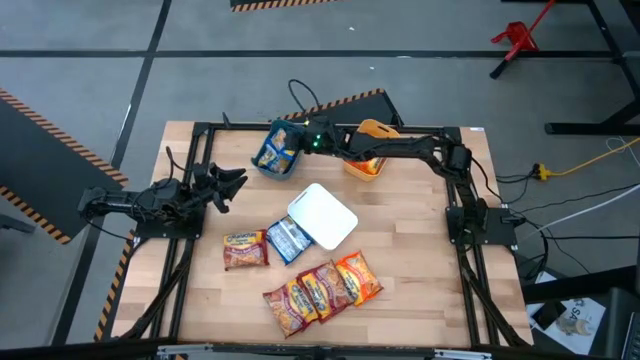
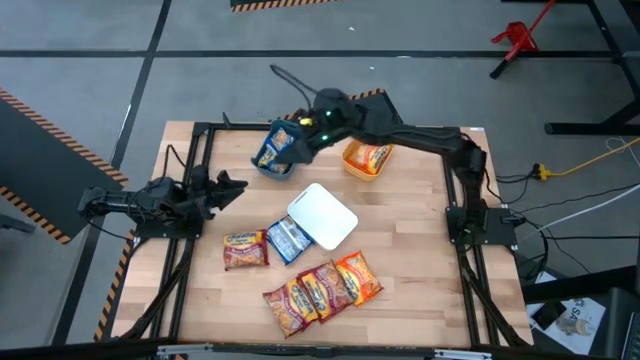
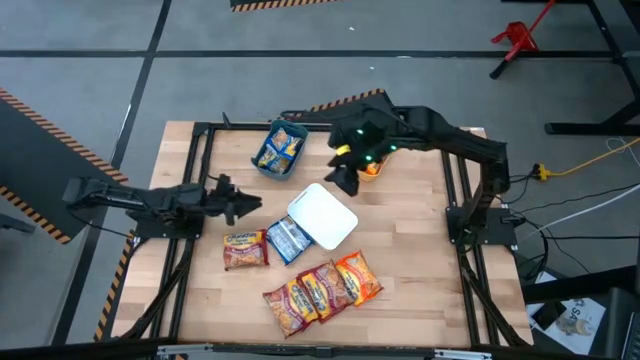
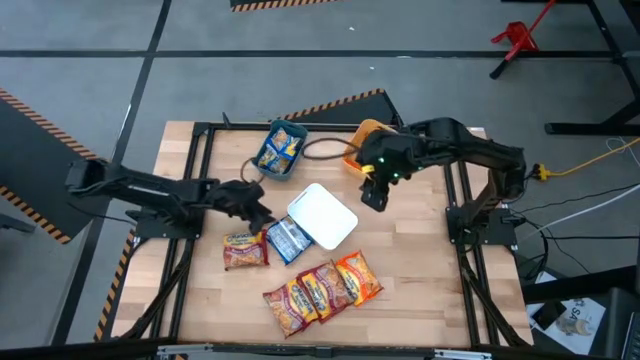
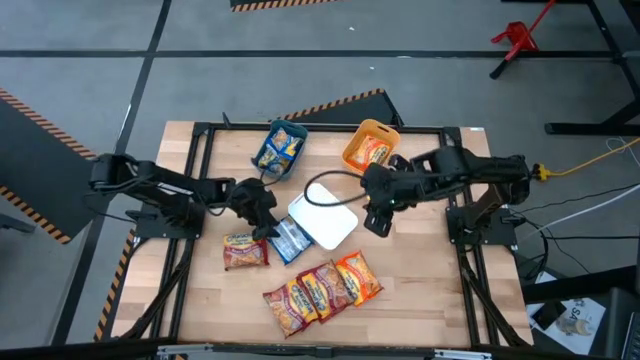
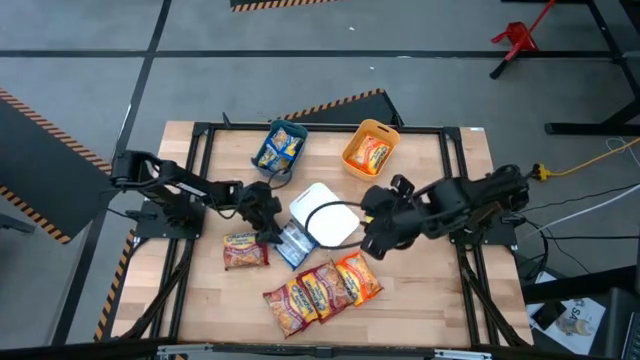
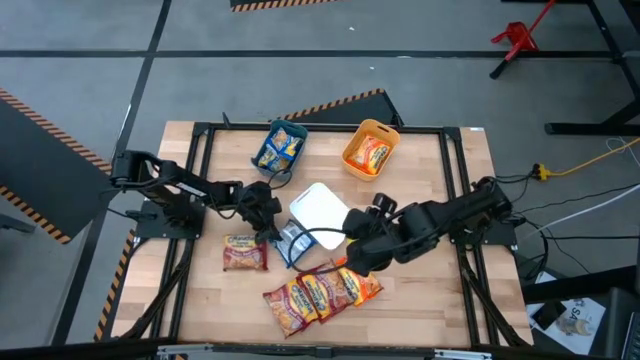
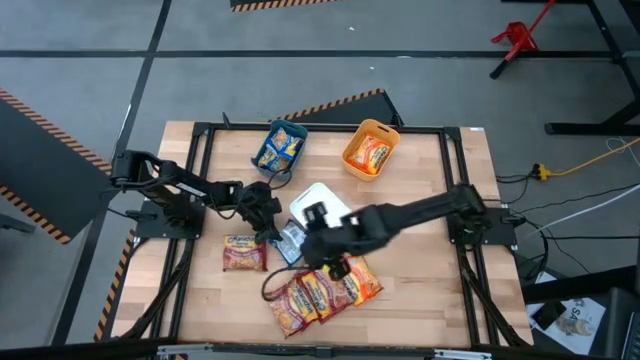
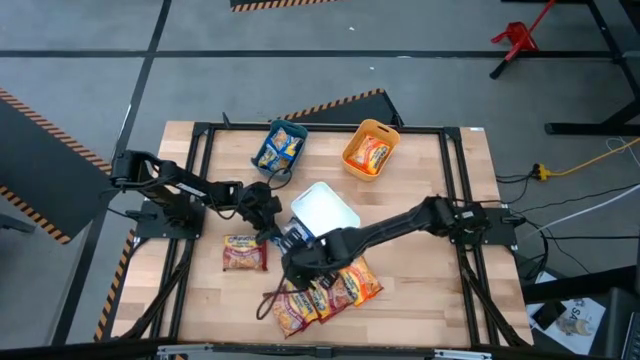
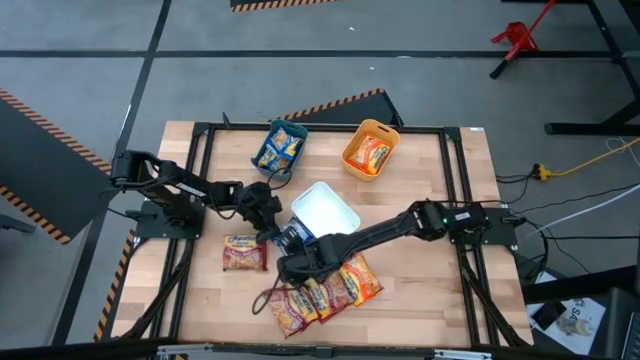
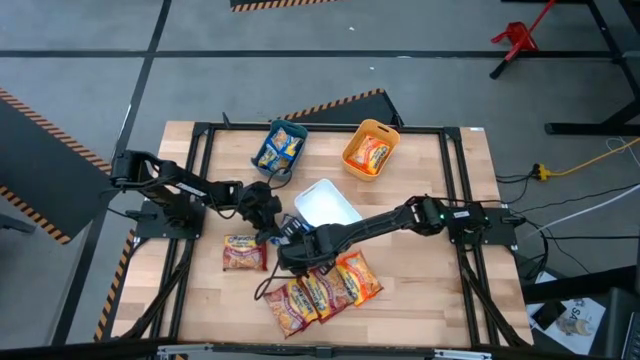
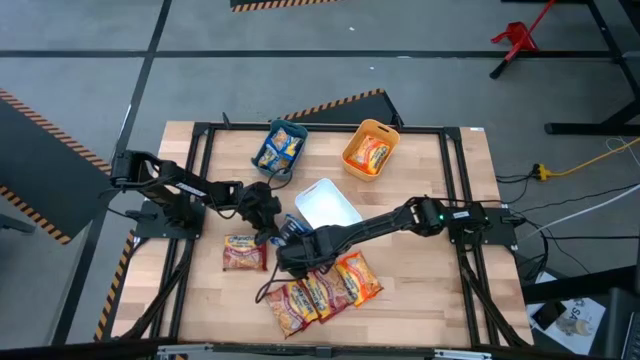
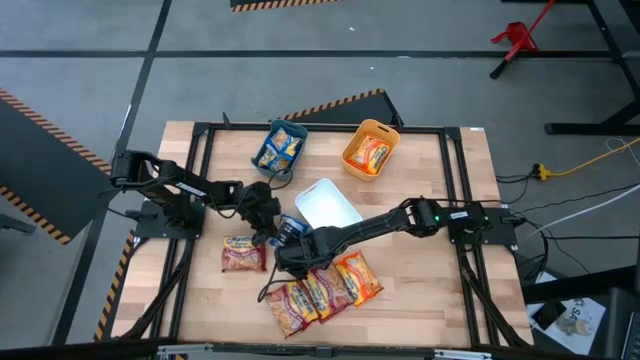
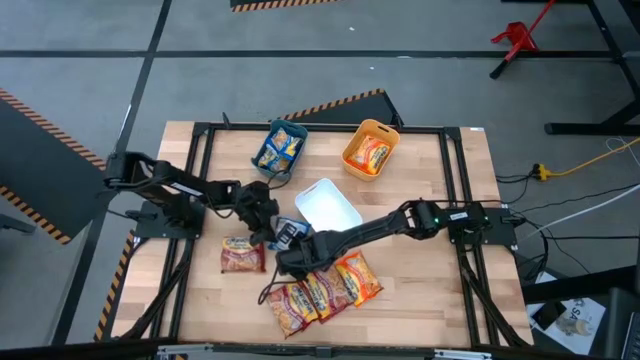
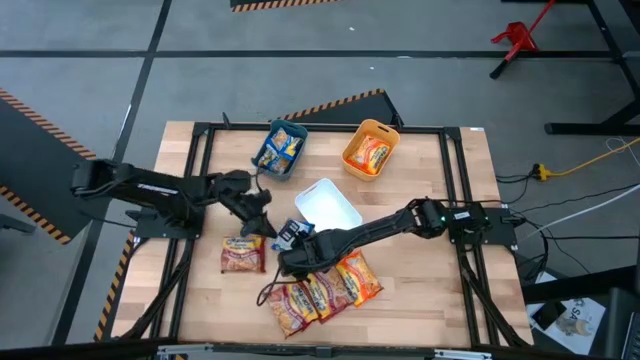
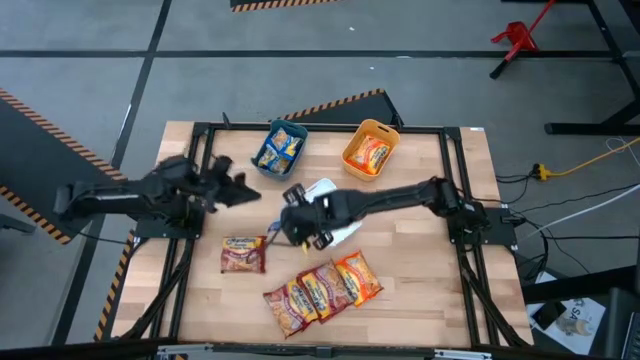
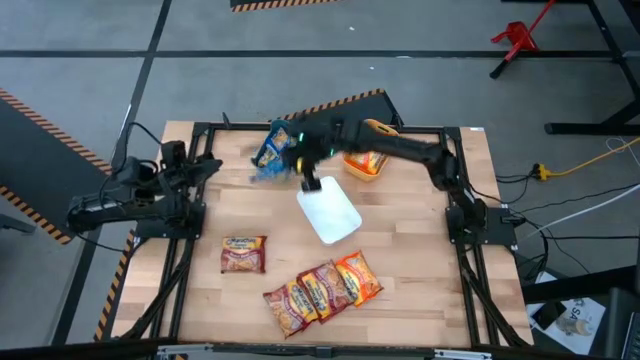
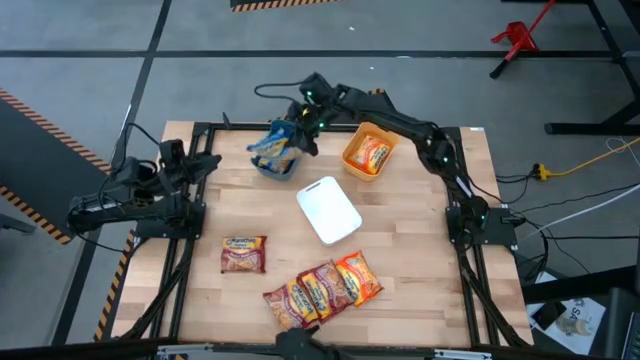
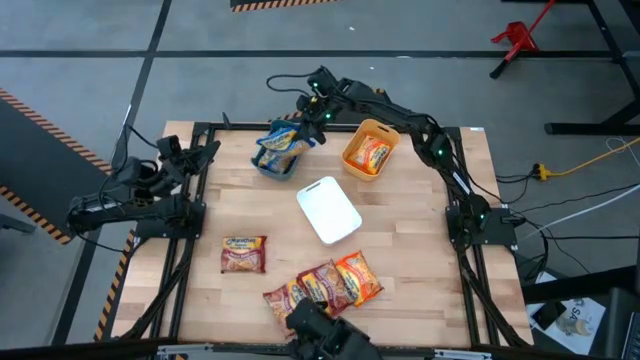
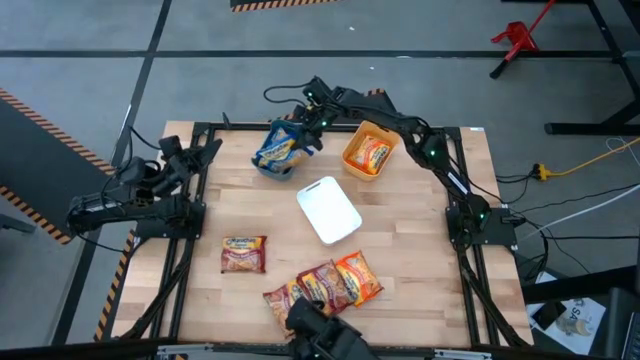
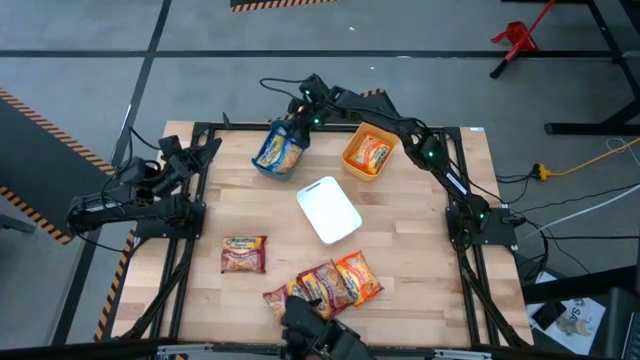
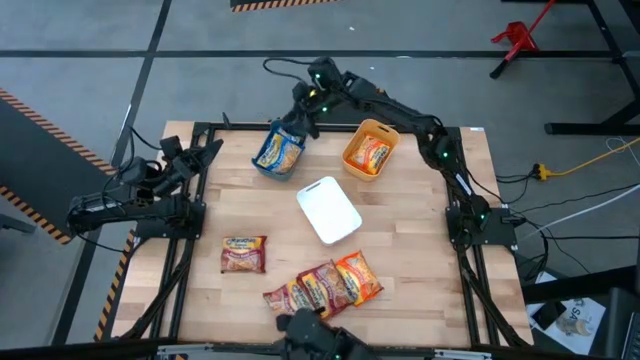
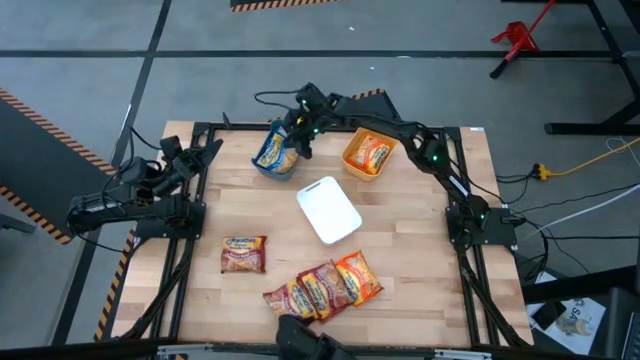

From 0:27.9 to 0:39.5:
Task: Sort Maruchan noodles
Put the blue noodle pack into the blue bin

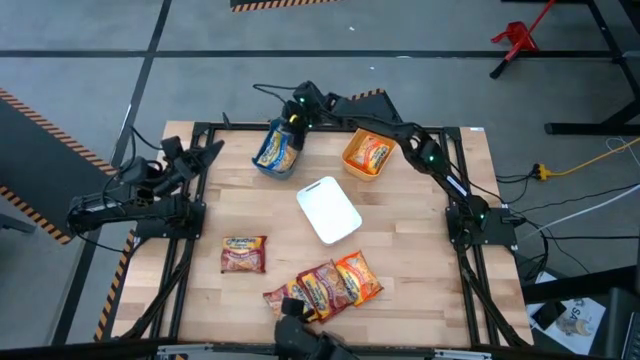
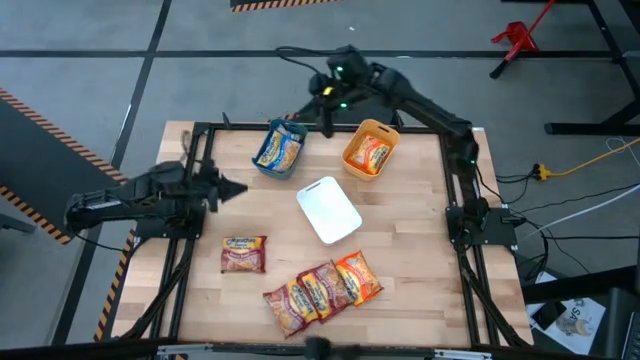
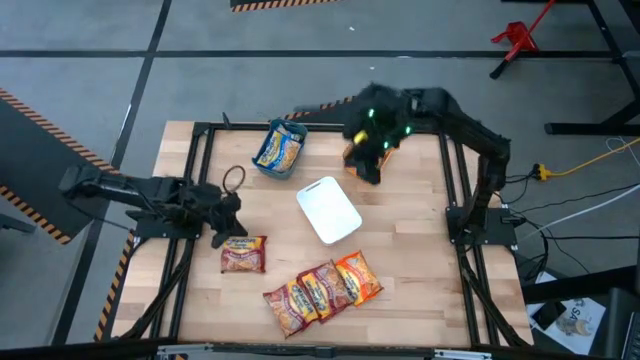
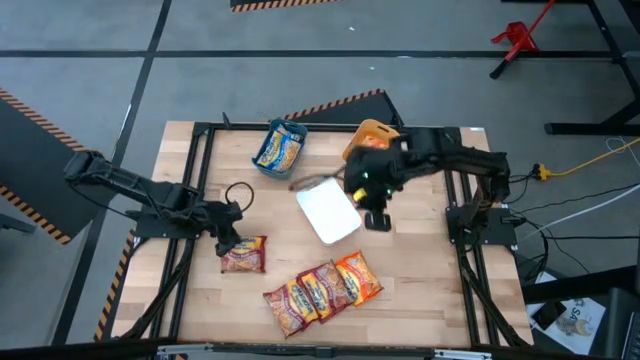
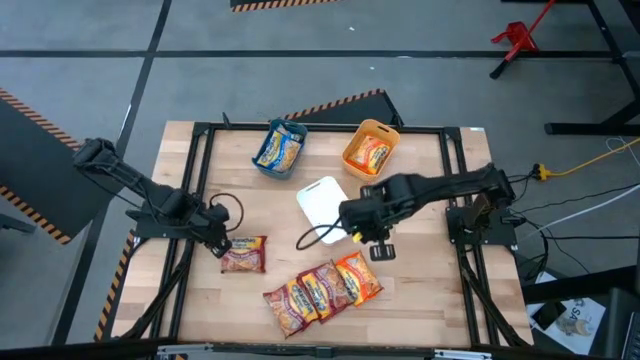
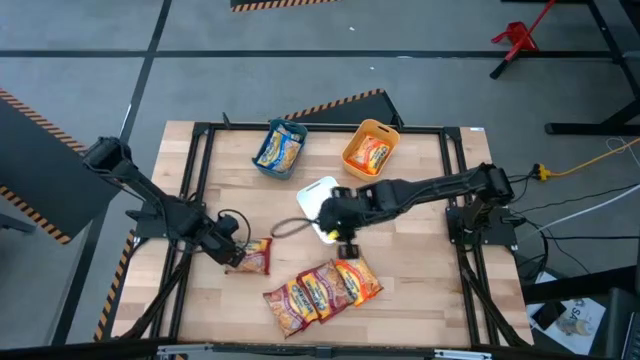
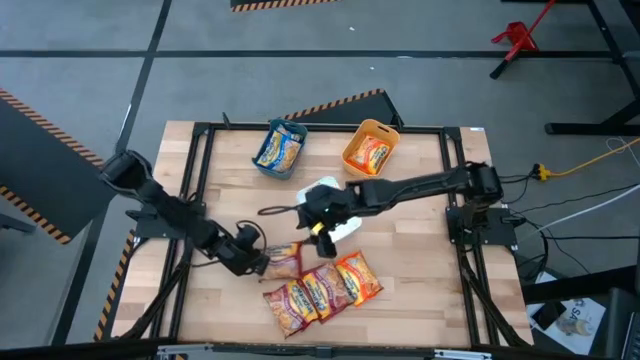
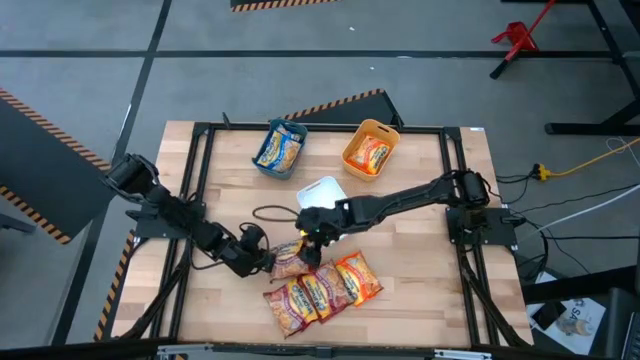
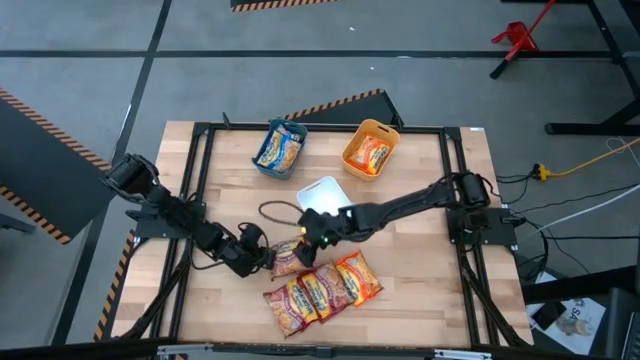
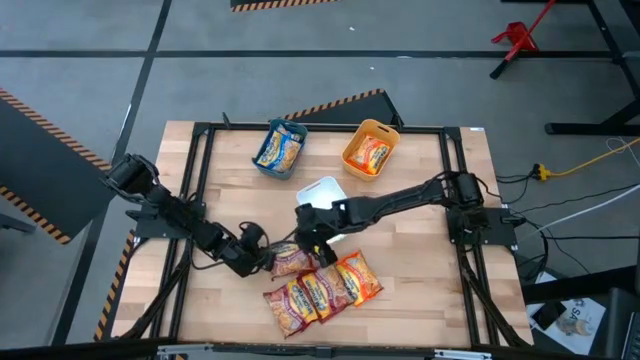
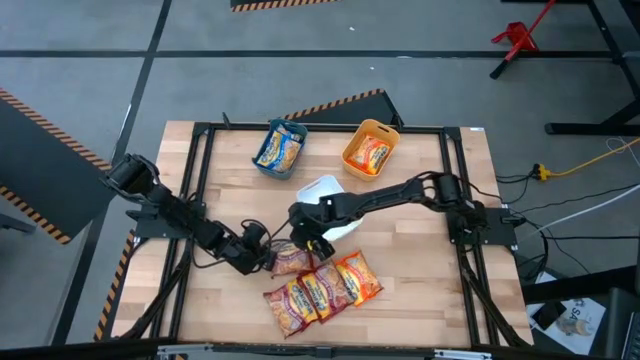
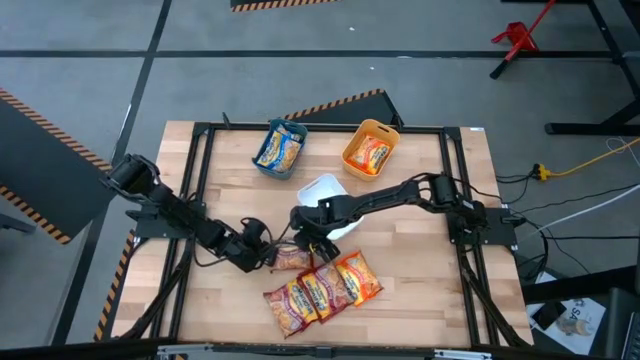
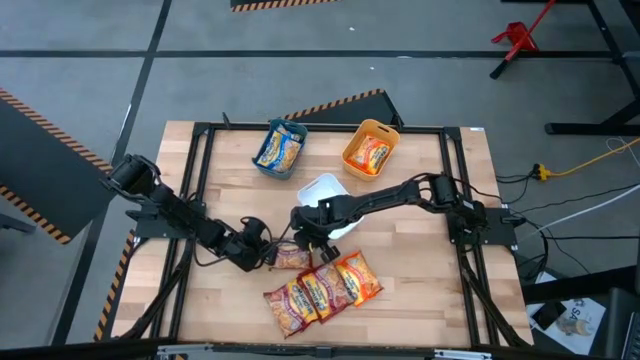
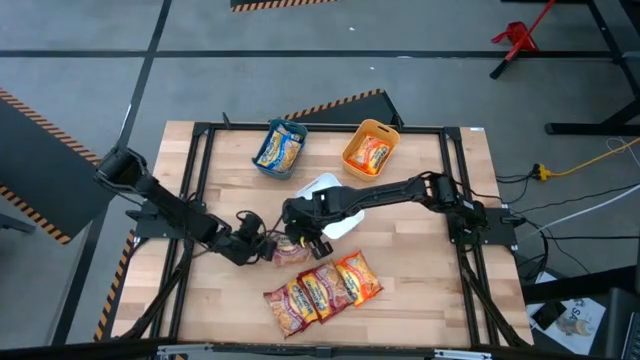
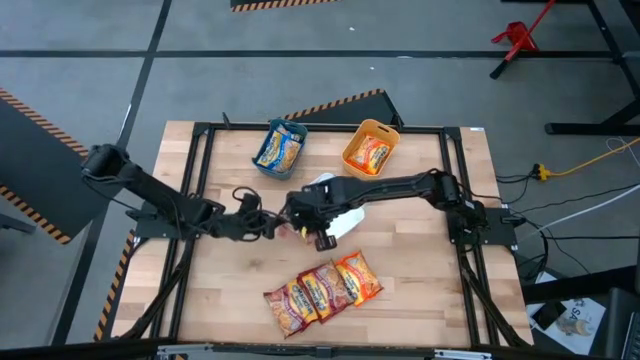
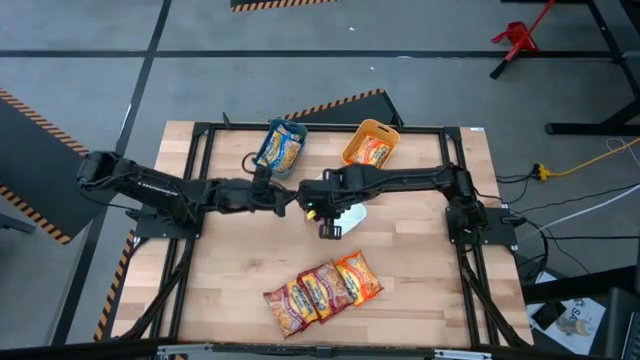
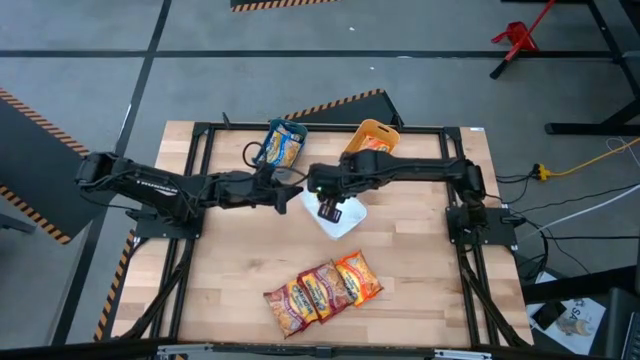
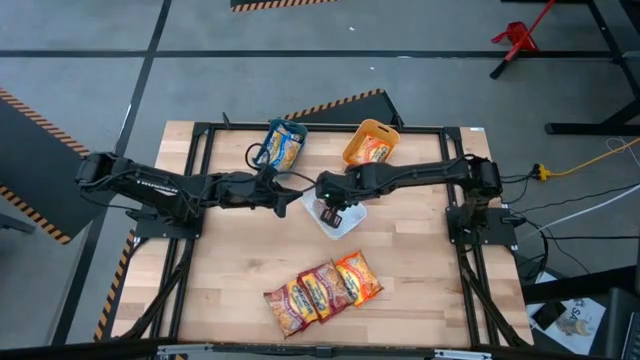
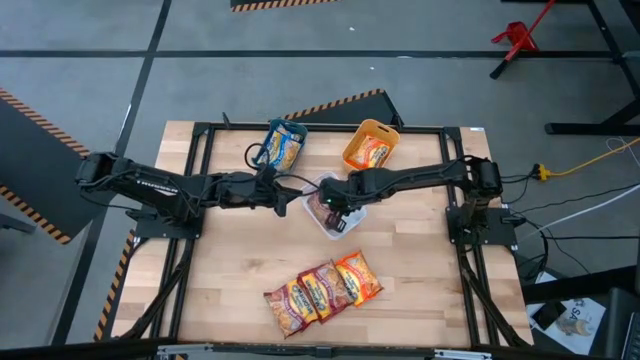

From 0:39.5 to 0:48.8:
Put the top red noodle pack into the white bin

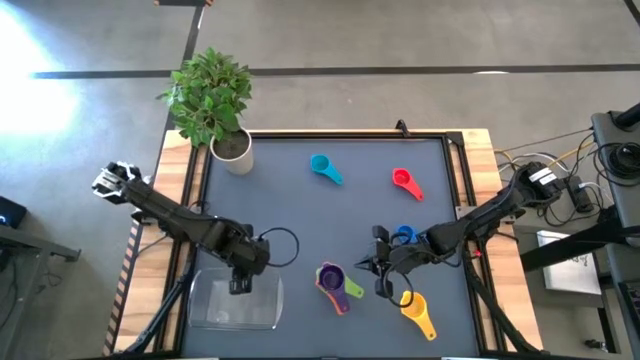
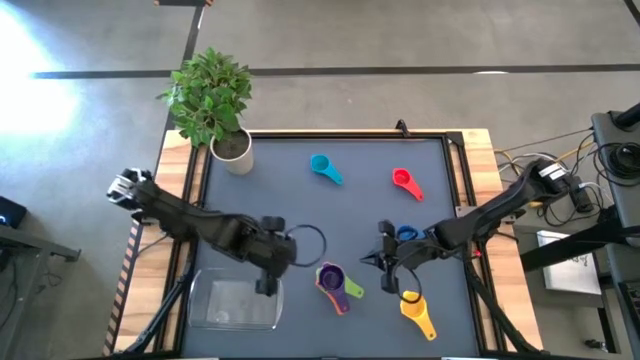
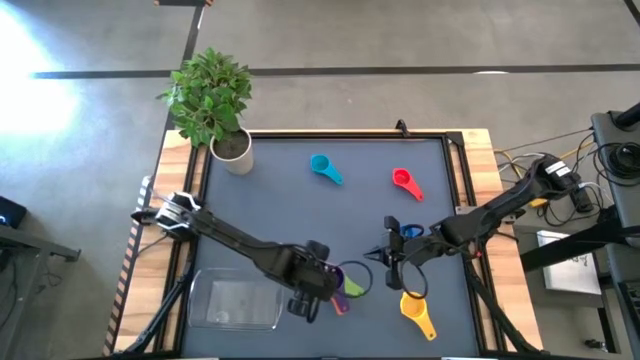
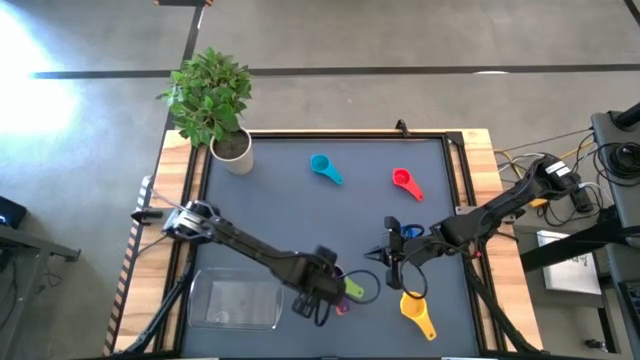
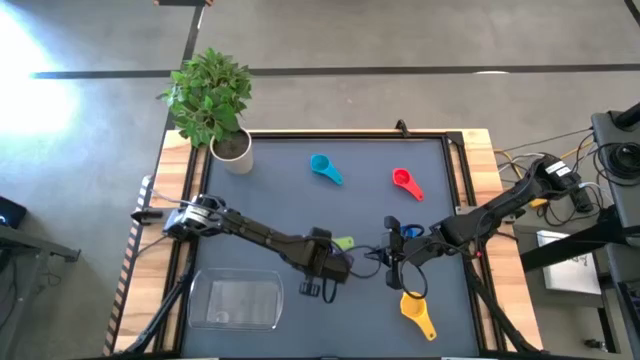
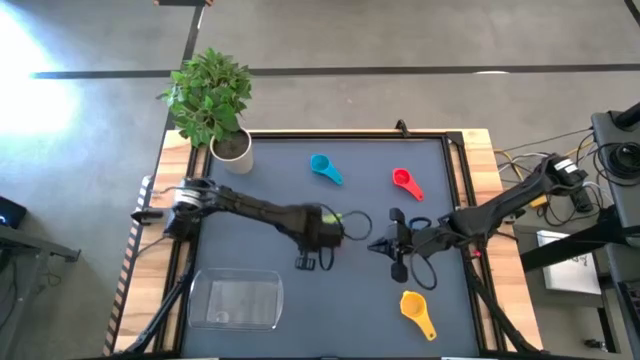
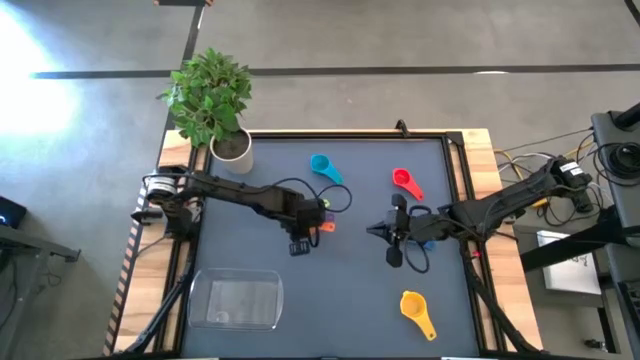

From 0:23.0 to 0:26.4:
Task: Nest measuring cups in basket
Move the stacked measuring cups to the center of the table
